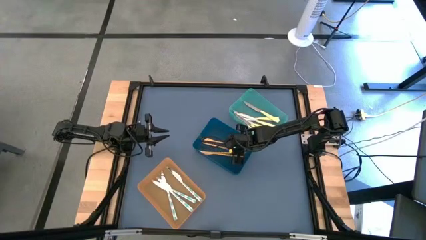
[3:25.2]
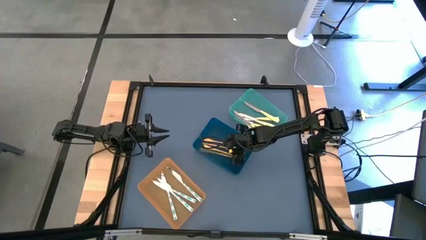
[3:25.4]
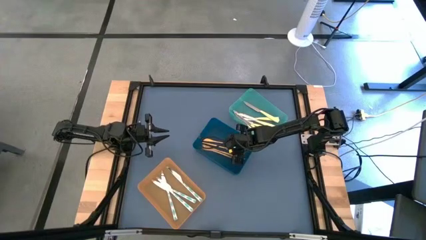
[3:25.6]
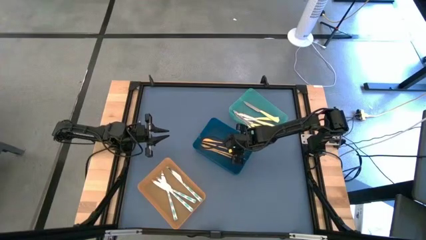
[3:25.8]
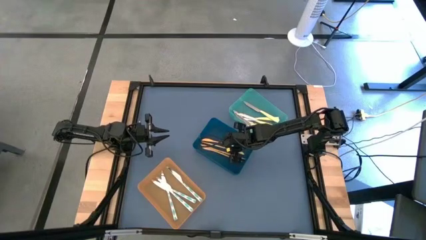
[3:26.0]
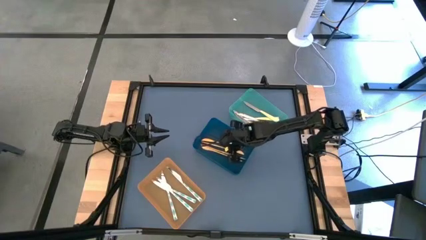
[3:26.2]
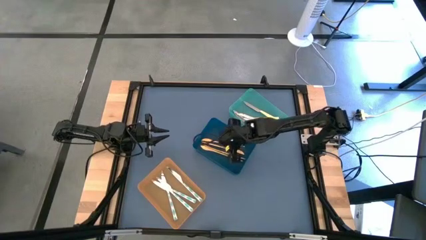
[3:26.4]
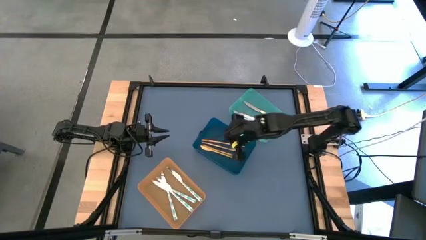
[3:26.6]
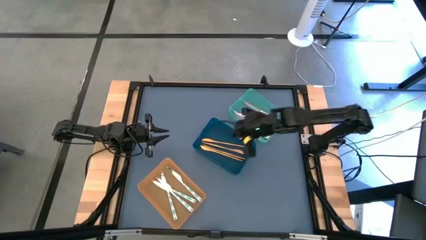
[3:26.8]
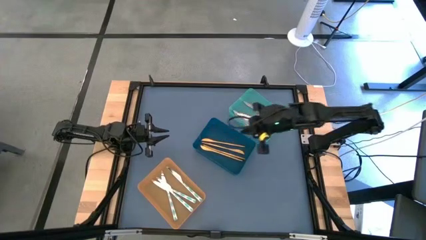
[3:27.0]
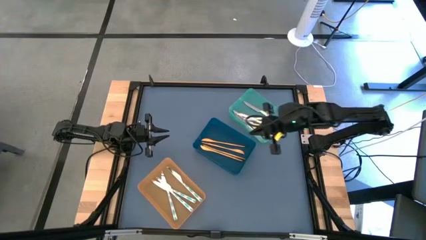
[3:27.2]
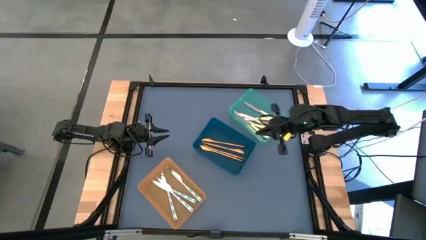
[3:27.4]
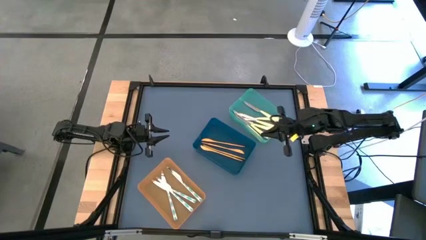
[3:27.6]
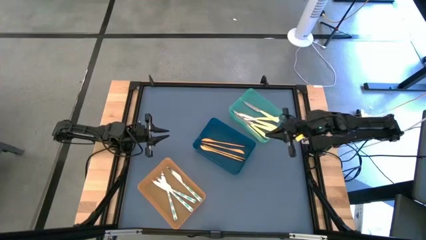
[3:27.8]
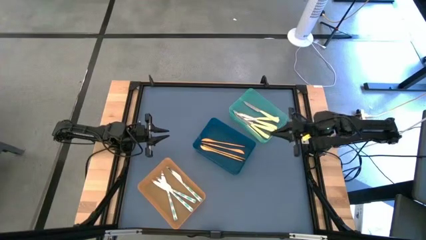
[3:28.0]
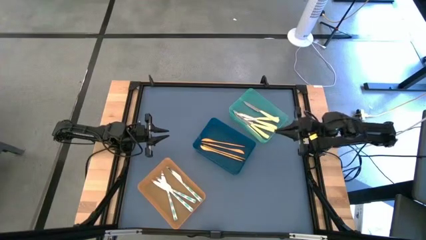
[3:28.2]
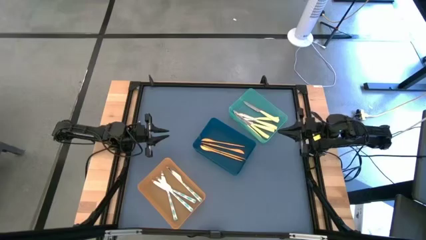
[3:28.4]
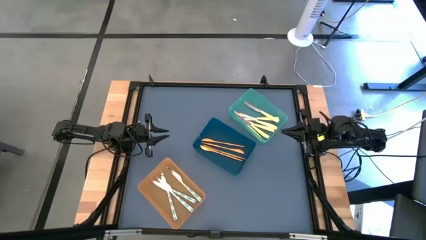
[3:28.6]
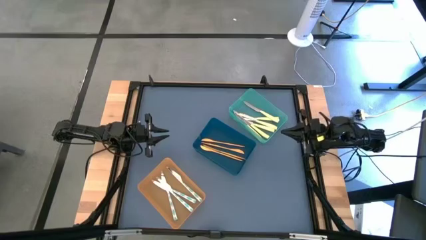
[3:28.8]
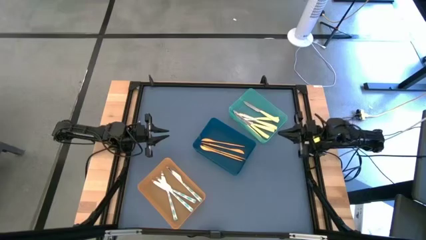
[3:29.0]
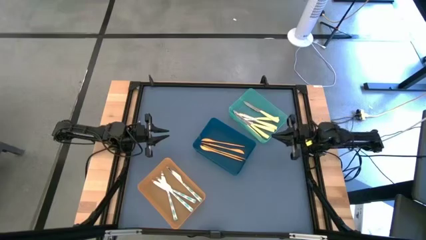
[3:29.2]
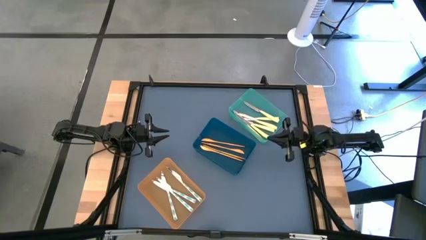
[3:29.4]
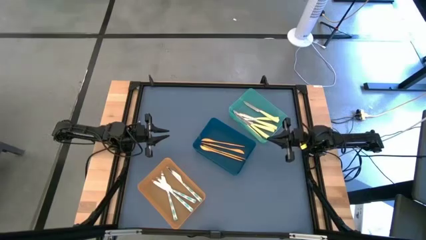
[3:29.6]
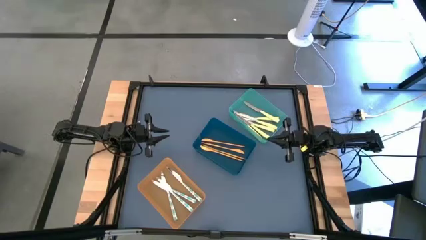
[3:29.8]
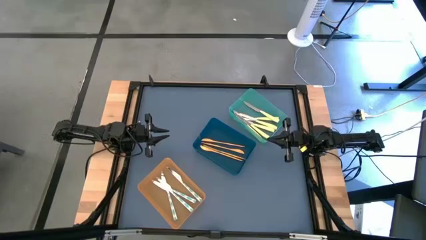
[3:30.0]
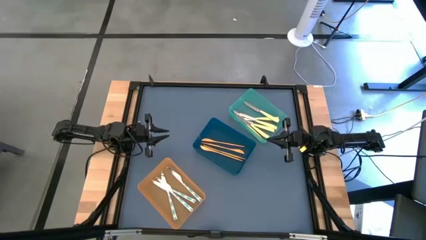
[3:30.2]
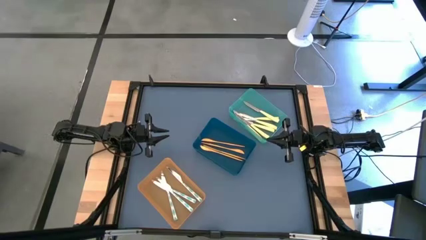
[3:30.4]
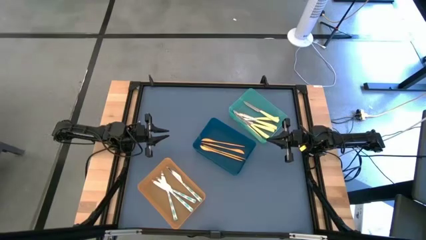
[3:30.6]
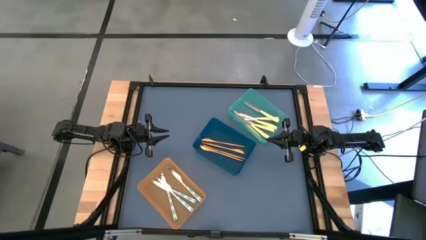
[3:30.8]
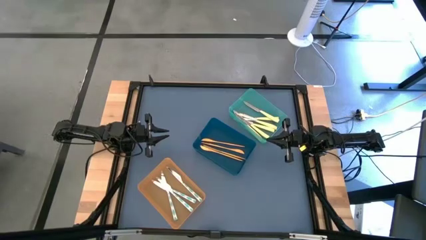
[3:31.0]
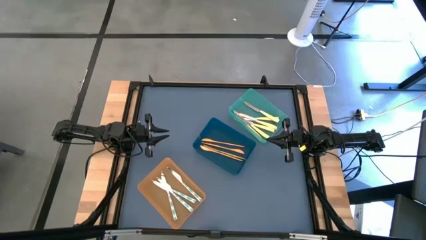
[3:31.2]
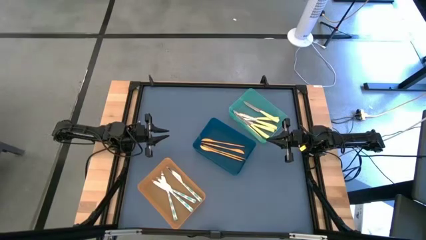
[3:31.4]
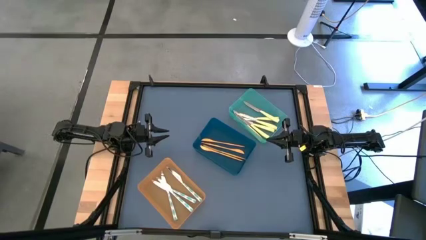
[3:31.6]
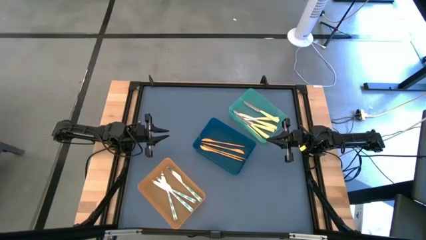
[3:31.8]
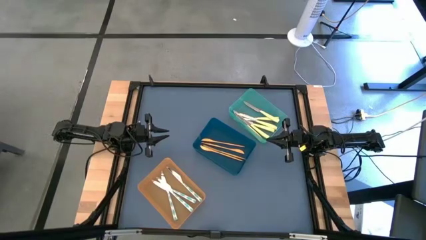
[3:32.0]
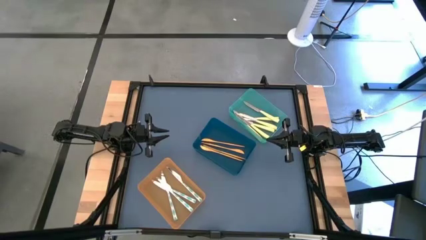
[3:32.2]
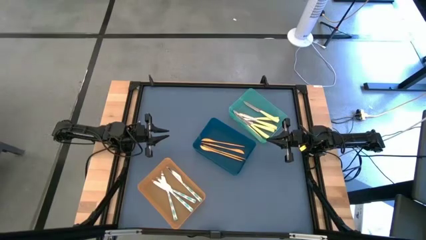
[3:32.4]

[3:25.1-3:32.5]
Task: Sort silverware by color (type)
Return to Home Position

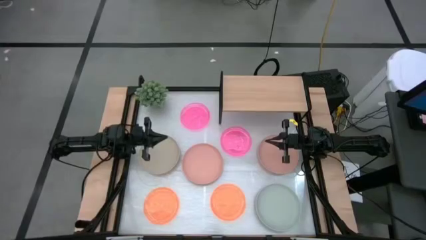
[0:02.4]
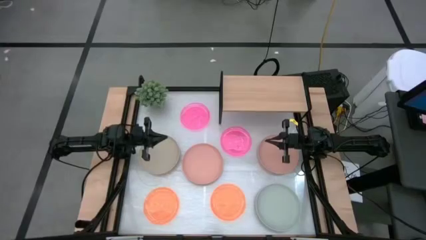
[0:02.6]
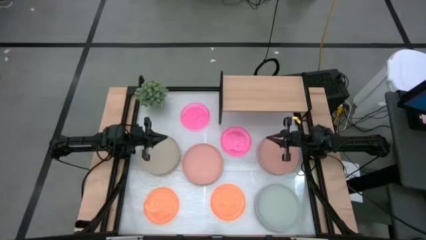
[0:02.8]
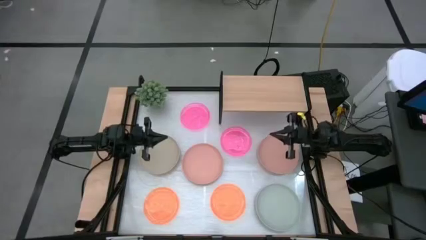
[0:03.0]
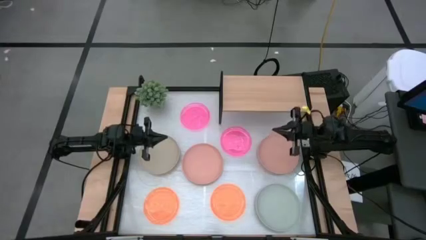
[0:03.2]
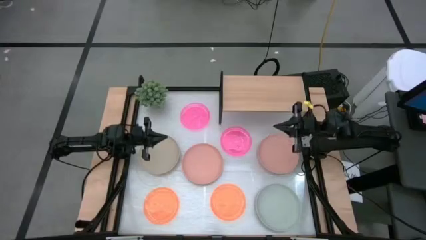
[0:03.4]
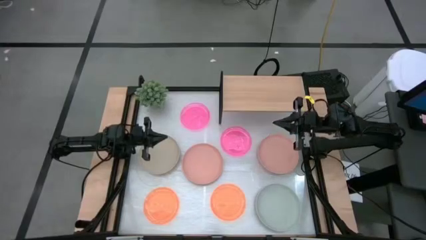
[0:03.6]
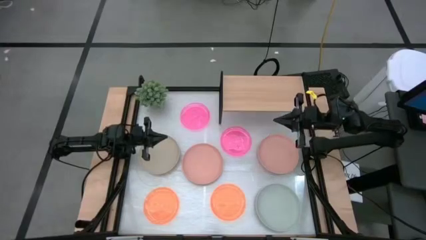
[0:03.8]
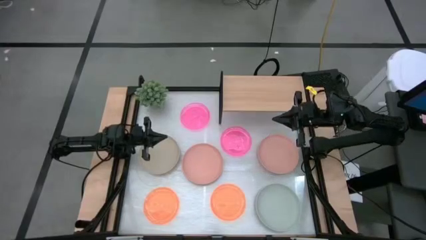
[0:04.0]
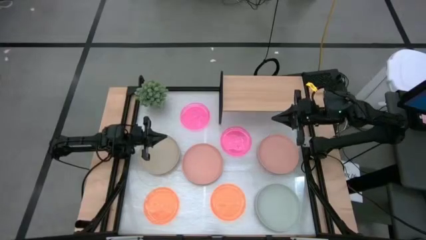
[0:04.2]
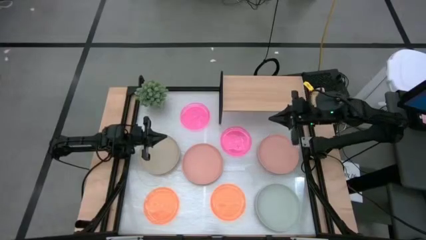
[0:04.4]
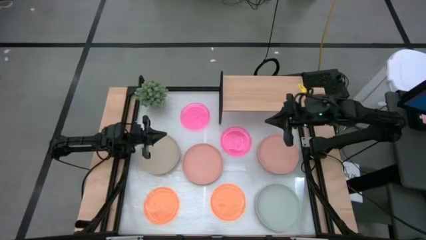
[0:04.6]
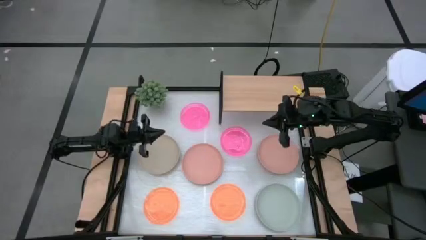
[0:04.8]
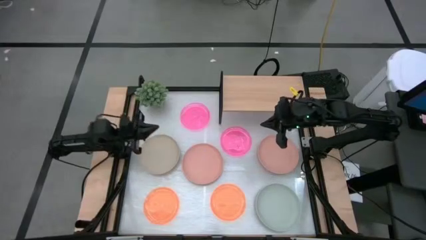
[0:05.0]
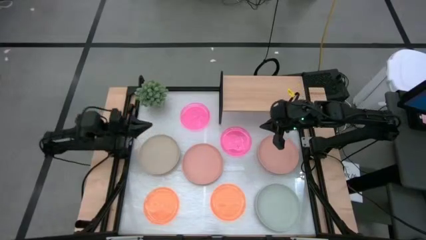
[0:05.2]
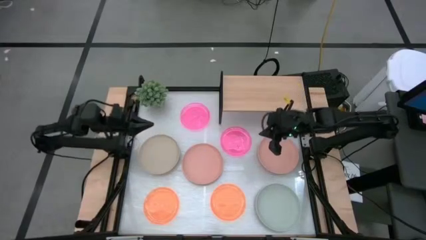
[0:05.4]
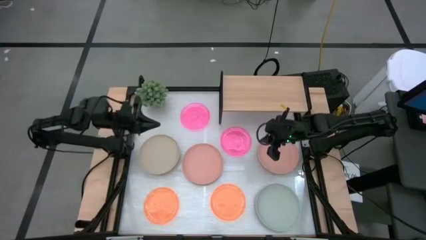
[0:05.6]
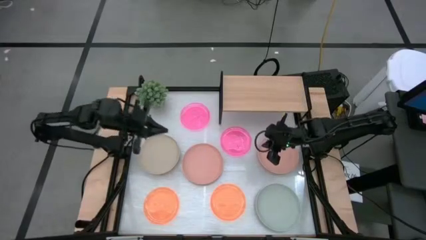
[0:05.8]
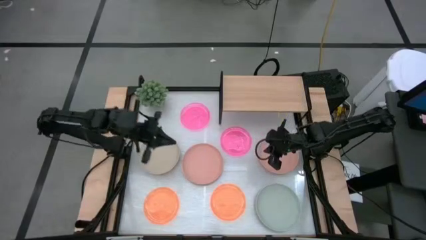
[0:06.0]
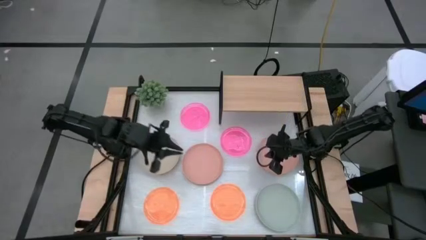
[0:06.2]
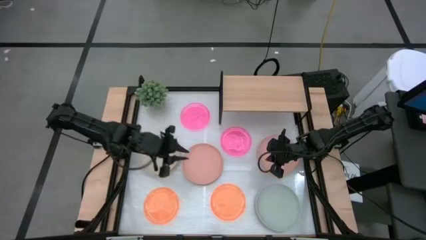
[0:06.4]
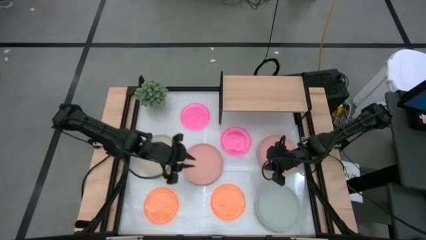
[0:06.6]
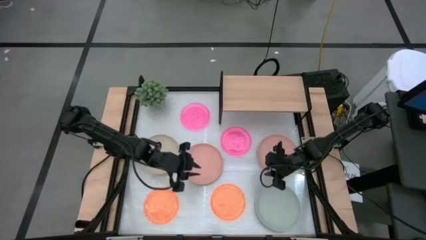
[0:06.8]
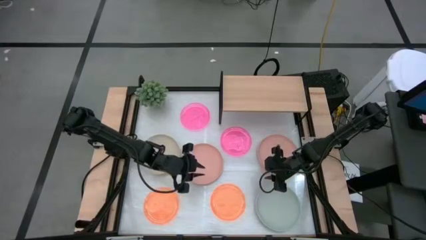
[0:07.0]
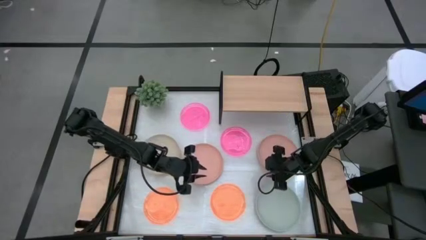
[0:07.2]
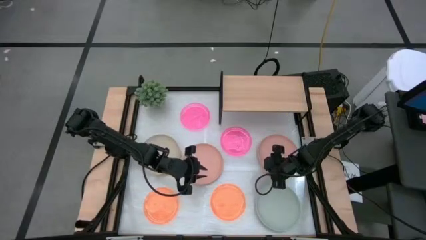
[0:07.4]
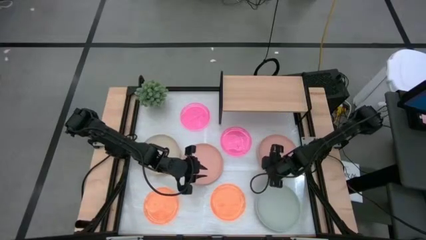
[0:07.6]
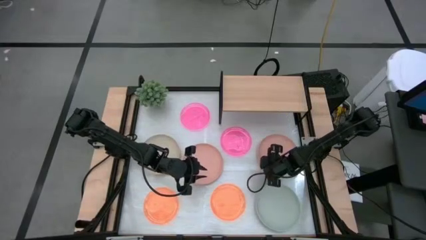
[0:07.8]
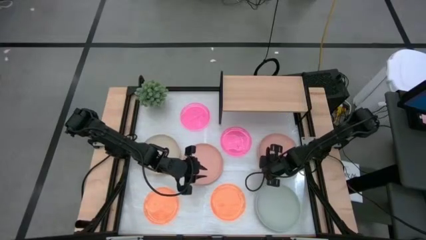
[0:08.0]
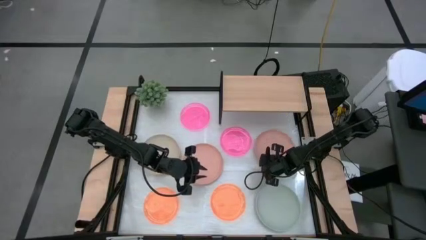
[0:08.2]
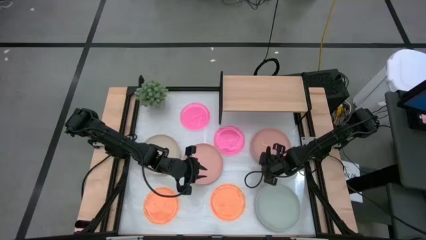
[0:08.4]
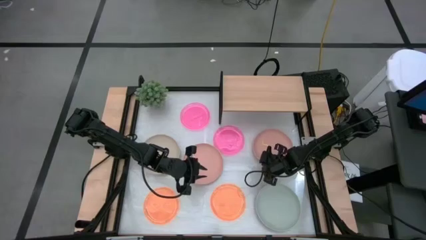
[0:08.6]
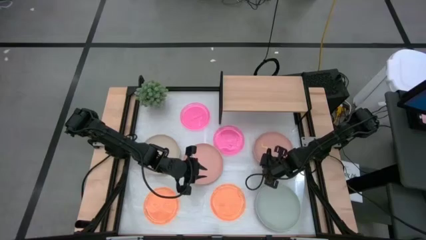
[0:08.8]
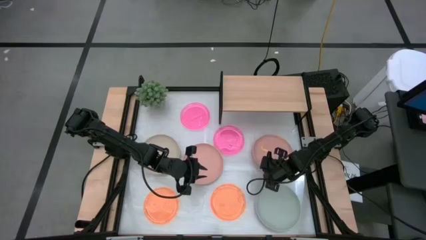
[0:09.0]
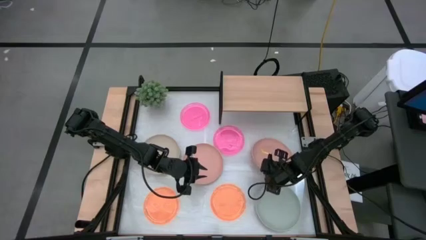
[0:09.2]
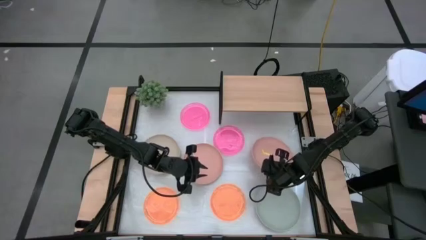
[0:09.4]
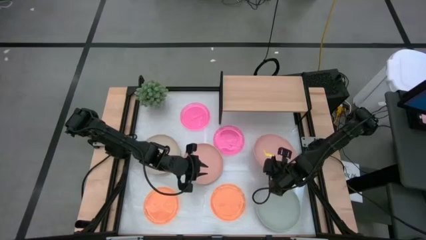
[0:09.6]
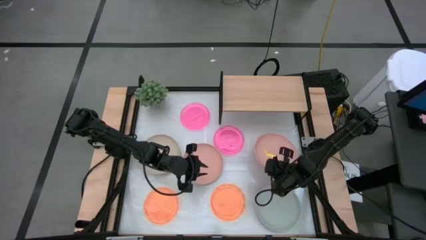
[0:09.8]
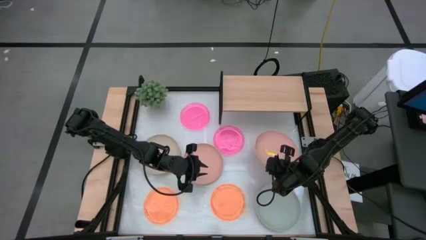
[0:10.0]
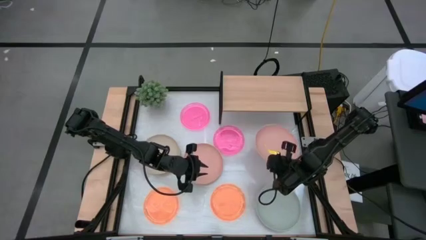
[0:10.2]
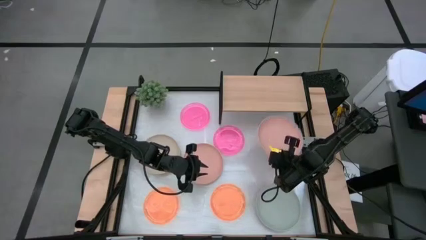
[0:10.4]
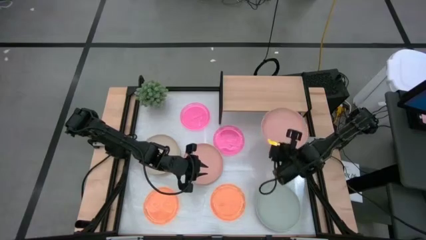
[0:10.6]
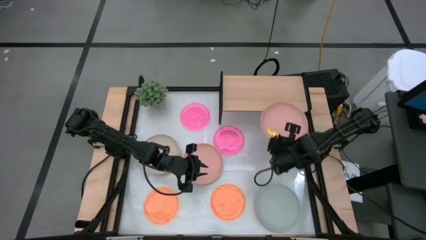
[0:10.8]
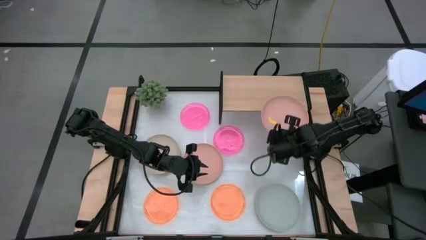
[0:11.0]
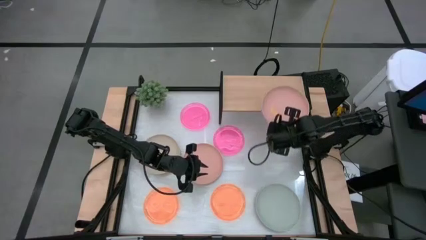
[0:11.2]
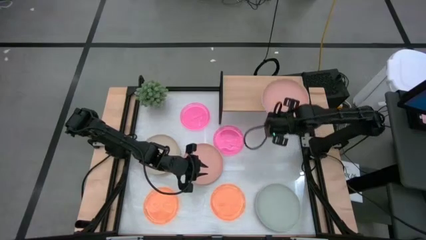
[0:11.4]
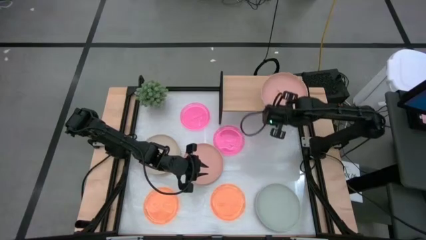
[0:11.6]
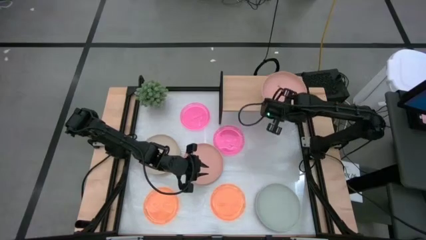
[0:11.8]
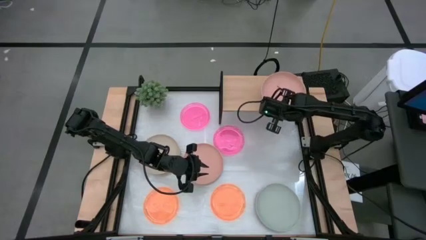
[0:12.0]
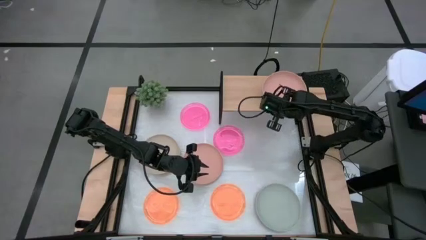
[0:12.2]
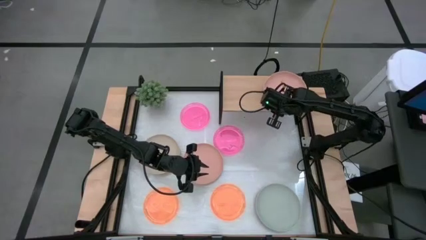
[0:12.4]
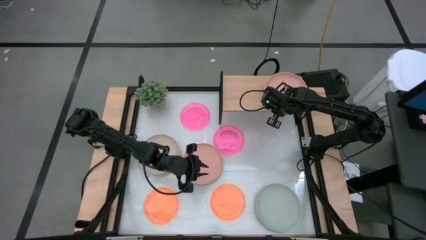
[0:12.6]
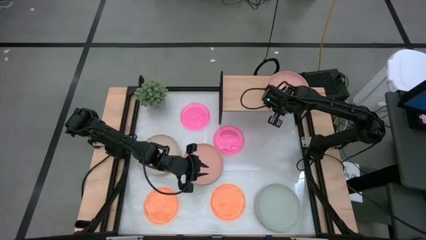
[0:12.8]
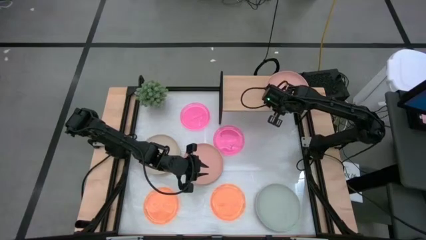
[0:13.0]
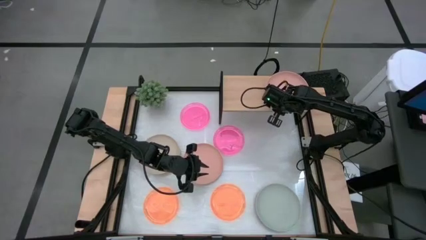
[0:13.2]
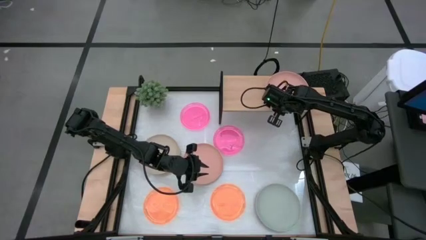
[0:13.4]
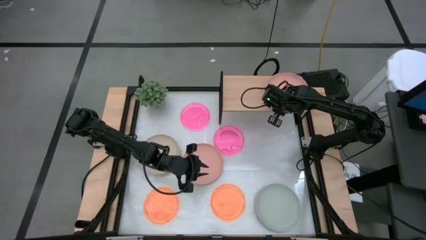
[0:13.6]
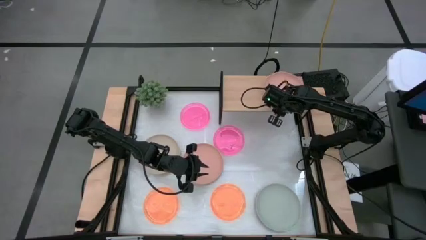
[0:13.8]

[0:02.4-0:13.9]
Task: Place and stack plates onto a shelf
Put the right light pink plate on the shelf
